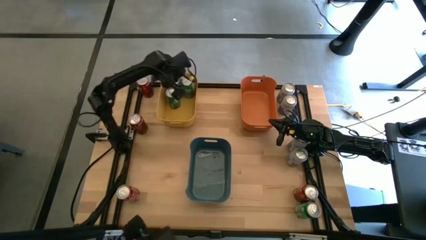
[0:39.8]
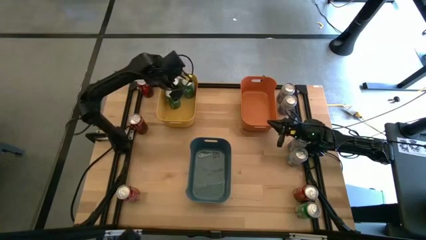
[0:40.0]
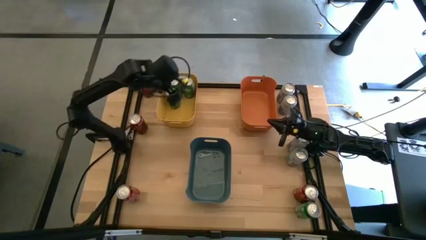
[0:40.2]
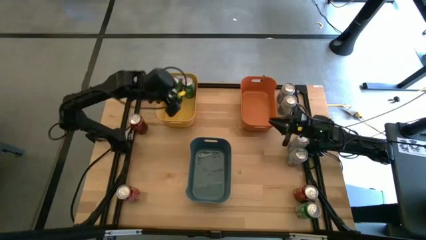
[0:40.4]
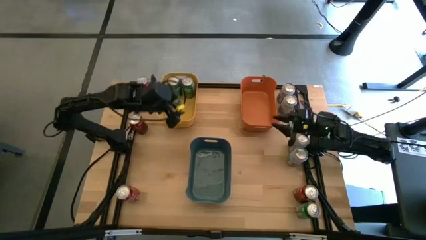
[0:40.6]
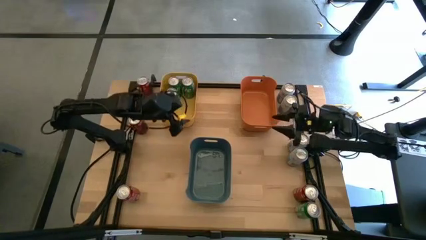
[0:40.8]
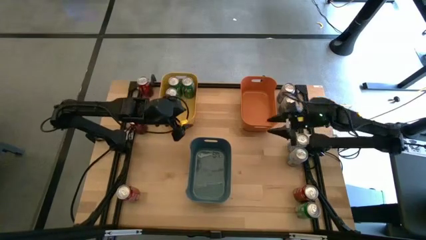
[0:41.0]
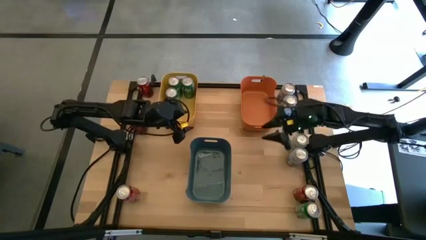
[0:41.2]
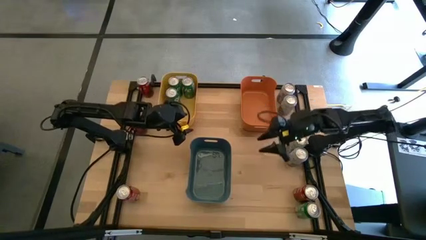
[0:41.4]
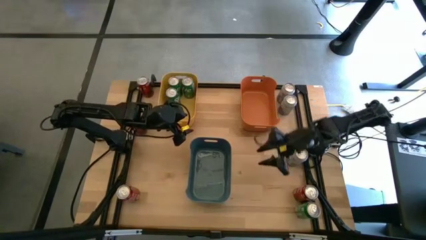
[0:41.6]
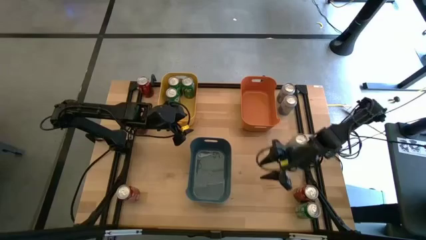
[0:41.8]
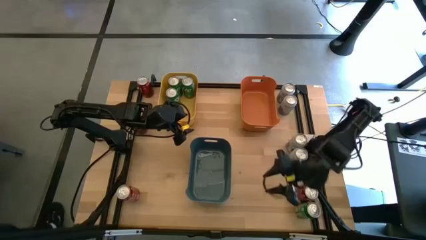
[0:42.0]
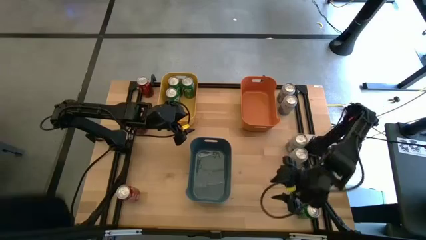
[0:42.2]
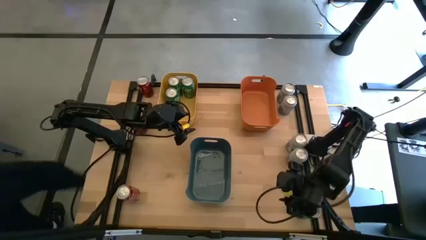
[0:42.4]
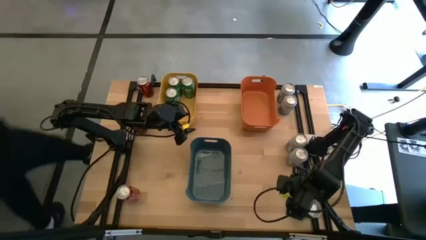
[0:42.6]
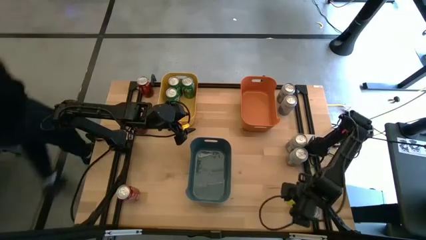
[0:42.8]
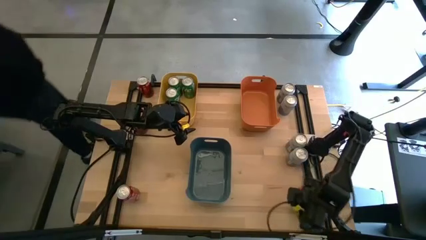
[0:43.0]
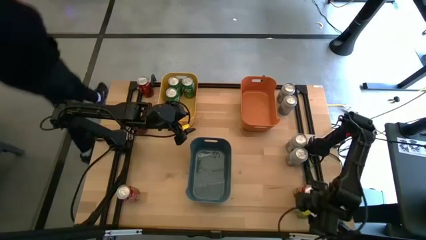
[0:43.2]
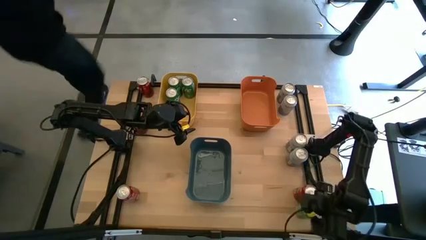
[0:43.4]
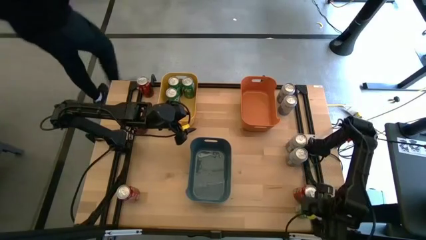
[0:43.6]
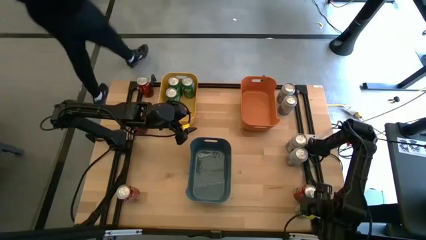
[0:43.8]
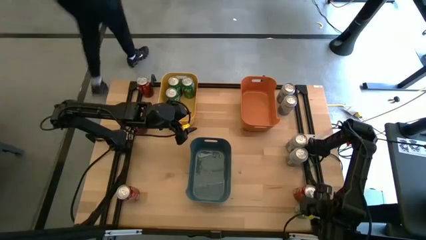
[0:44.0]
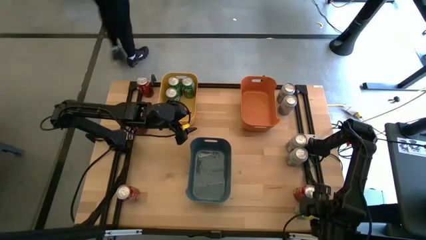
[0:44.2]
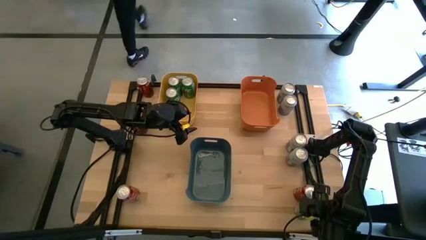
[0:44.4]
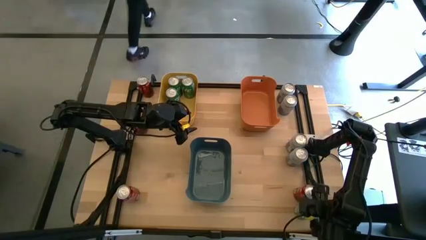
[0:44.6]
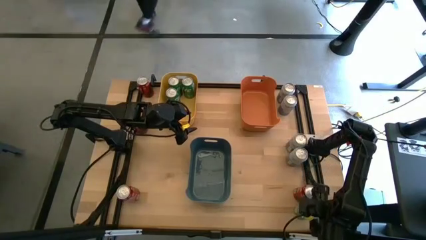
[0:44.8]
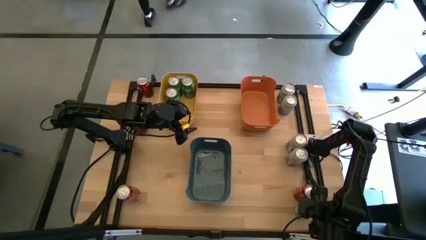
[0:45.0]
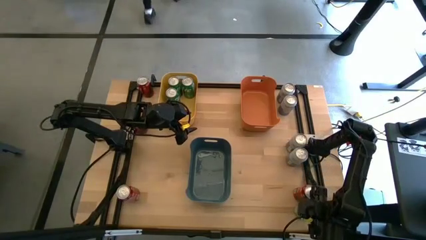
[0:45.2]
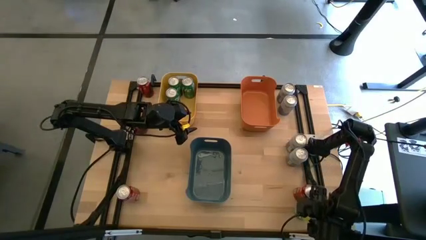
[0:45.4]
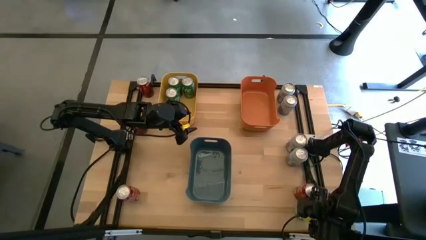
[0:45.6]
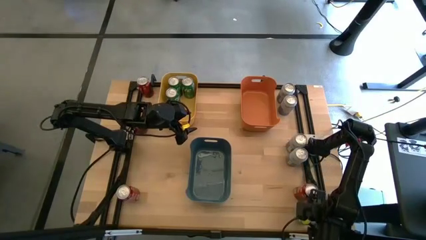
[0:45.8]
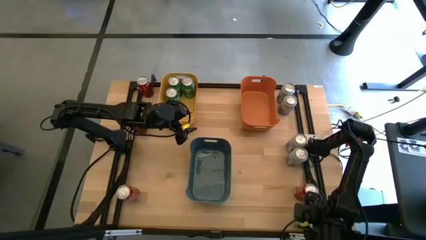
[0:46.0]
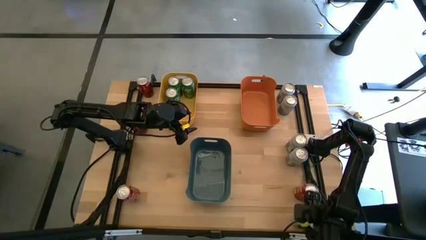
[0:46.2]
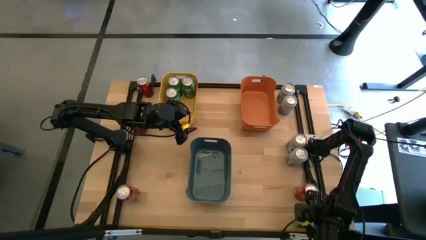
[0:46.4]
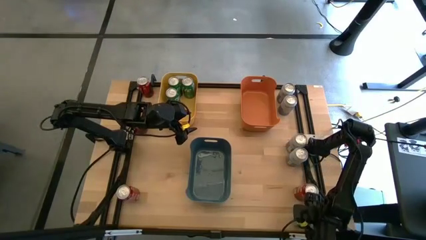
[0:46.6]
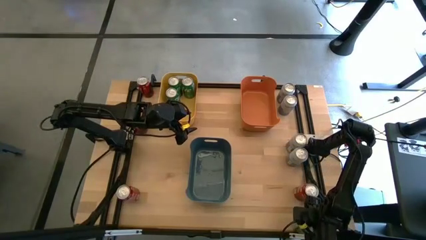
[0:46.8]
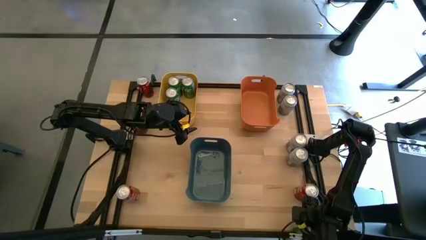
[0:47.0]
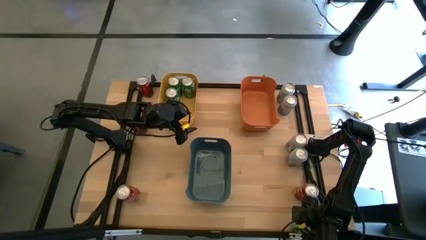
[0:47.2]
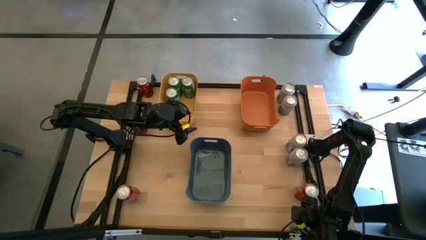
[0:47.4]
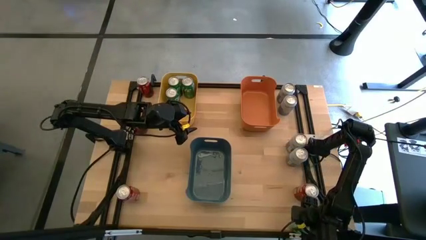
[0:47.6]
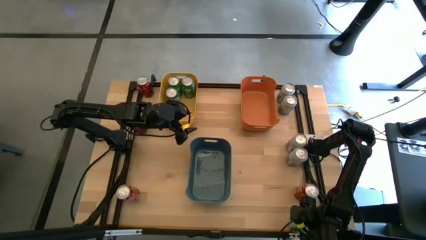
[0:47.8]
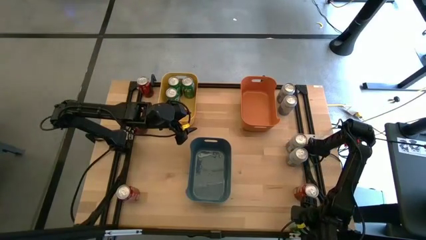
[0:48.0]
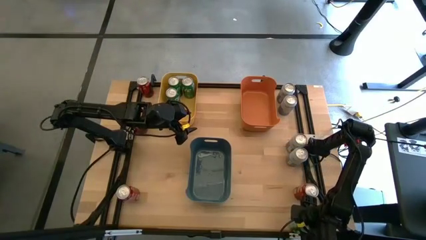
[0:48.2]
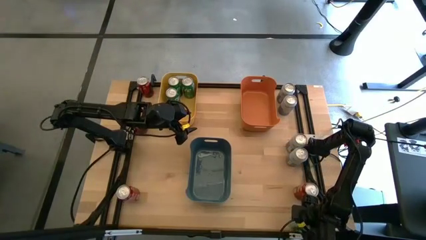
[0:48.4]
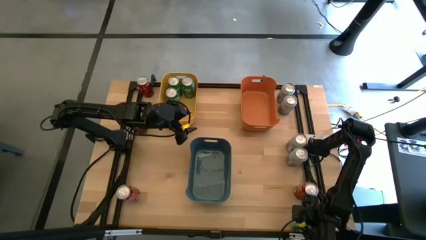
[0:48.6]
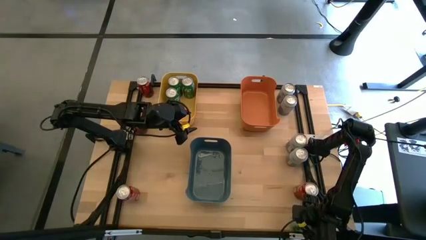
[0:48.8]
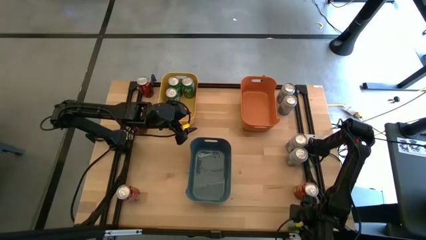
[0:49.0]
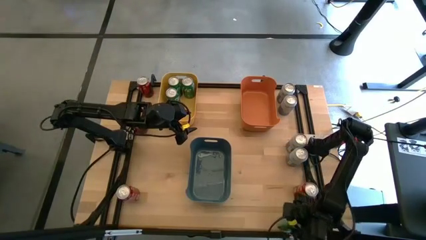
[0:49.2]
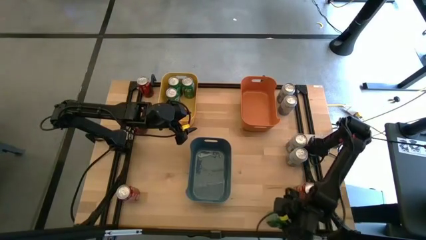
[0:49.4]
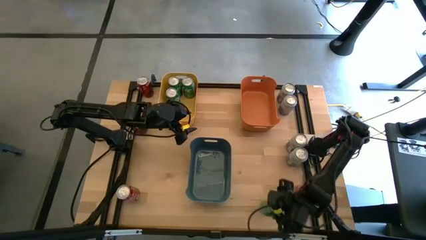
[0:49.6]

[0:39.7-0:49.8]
Task: Sort soda cans
Put the green soda can into the yellow bin

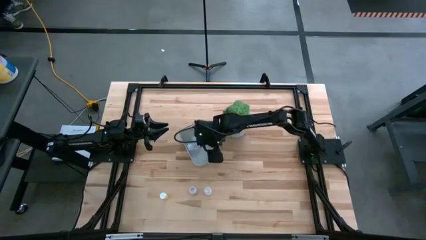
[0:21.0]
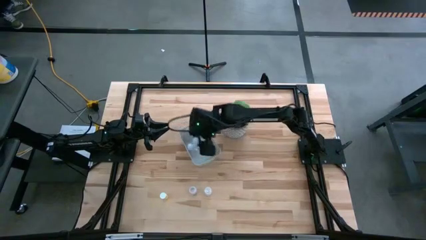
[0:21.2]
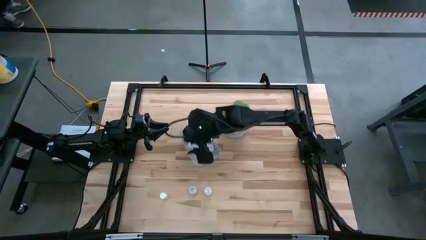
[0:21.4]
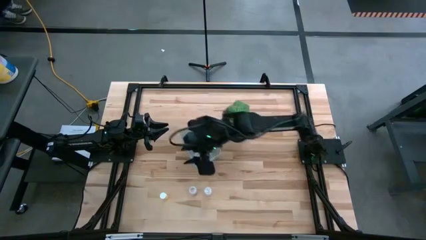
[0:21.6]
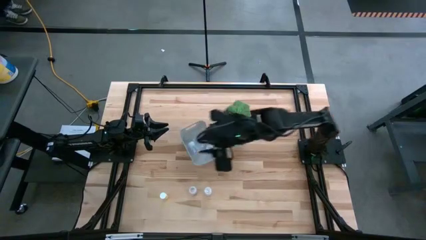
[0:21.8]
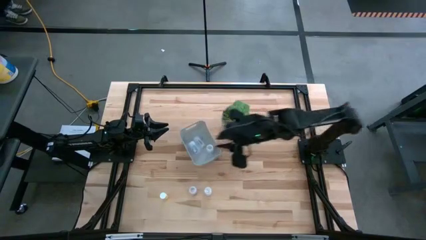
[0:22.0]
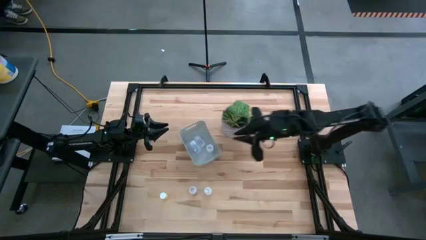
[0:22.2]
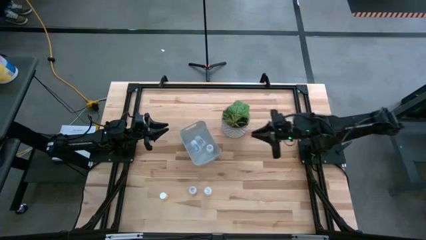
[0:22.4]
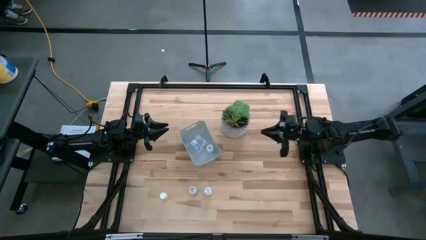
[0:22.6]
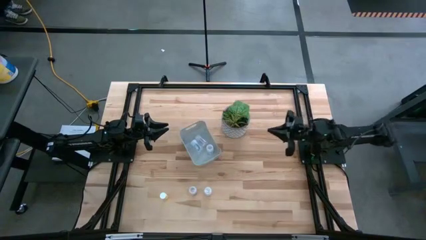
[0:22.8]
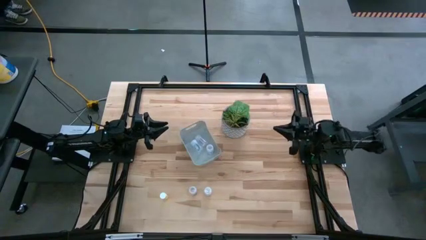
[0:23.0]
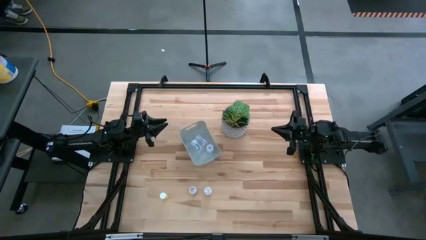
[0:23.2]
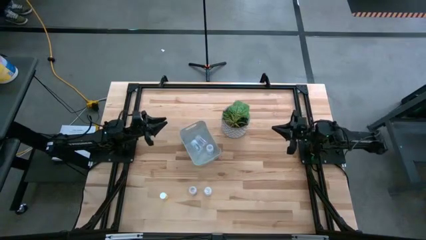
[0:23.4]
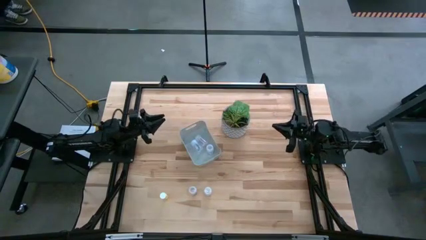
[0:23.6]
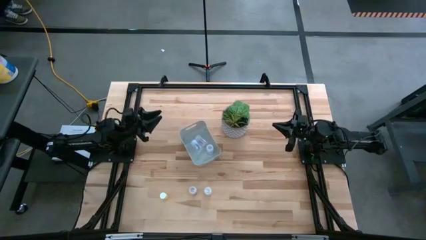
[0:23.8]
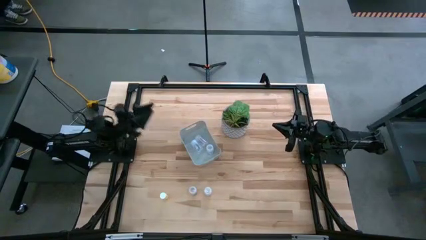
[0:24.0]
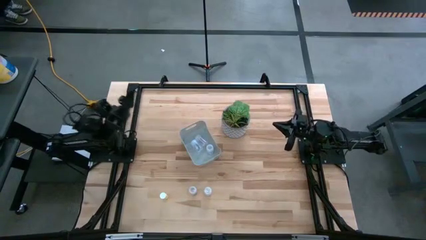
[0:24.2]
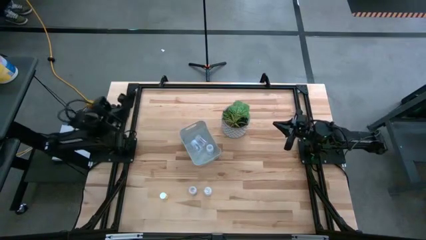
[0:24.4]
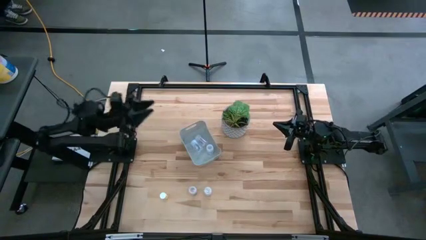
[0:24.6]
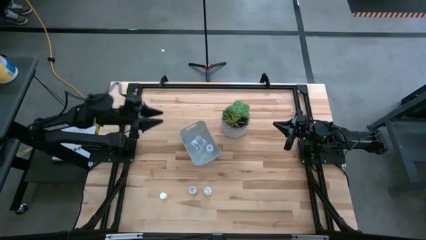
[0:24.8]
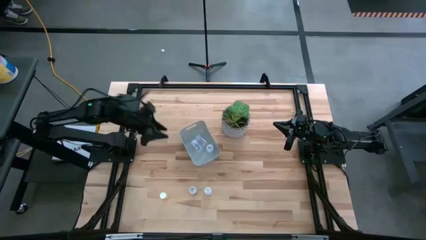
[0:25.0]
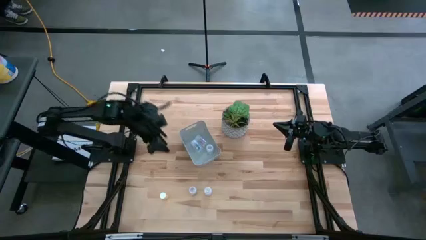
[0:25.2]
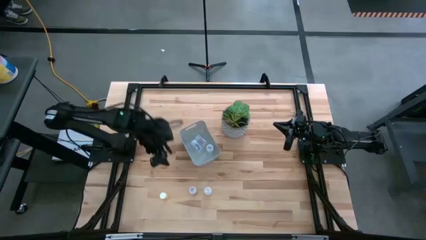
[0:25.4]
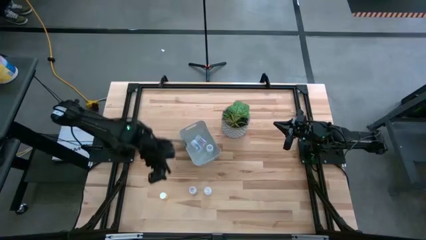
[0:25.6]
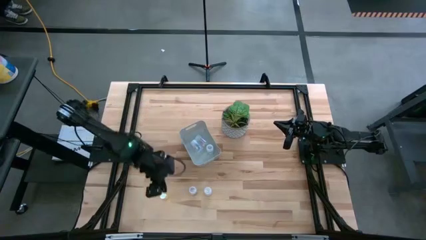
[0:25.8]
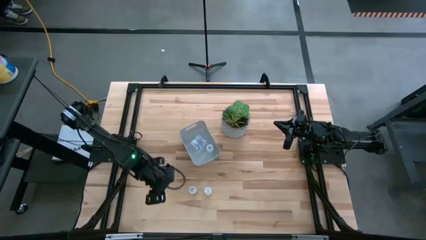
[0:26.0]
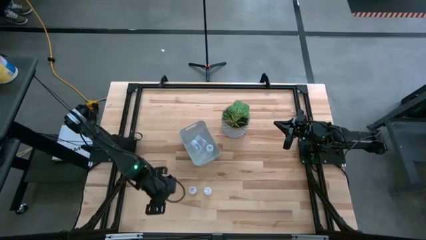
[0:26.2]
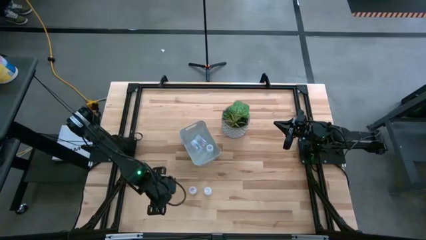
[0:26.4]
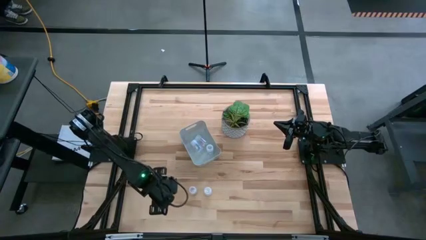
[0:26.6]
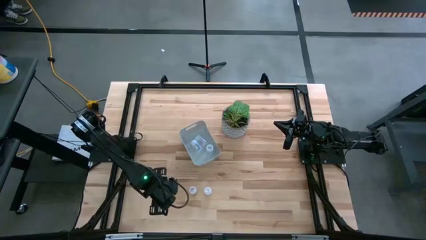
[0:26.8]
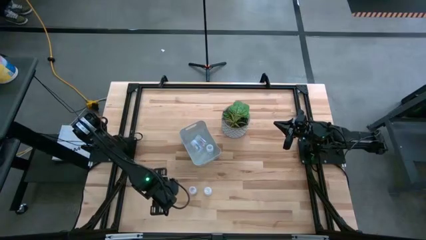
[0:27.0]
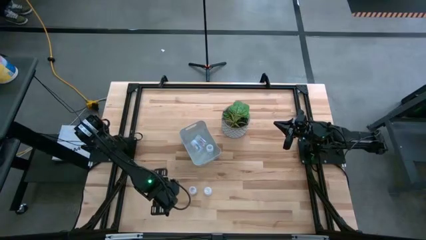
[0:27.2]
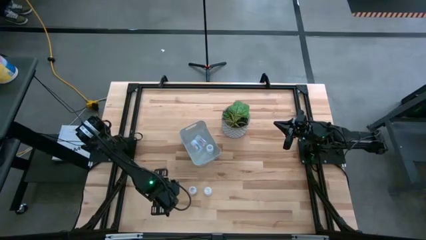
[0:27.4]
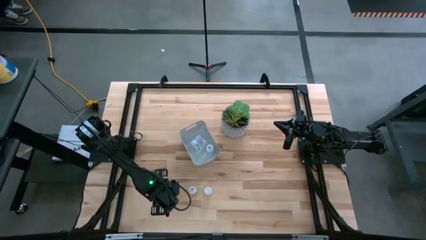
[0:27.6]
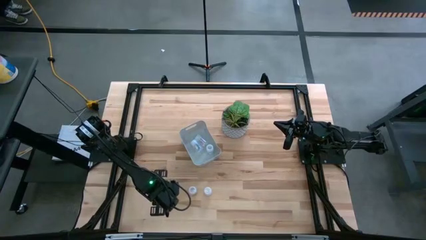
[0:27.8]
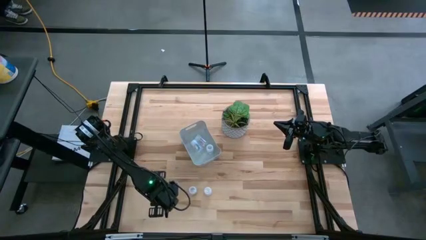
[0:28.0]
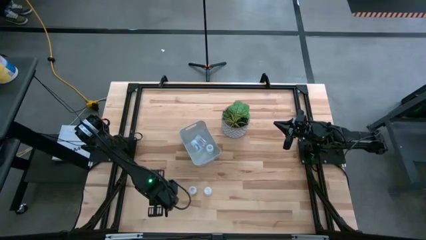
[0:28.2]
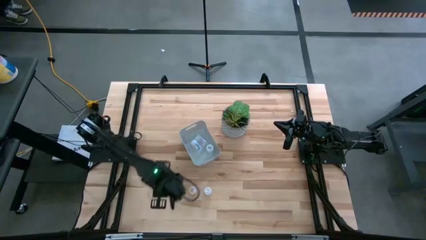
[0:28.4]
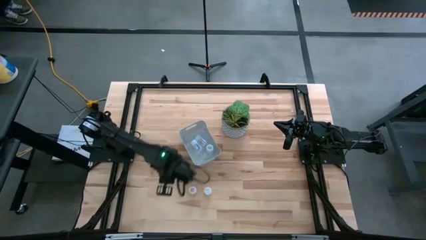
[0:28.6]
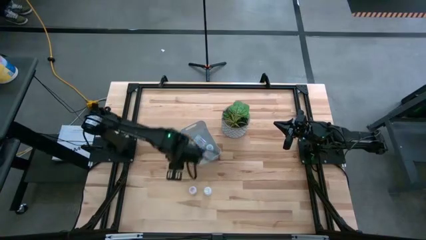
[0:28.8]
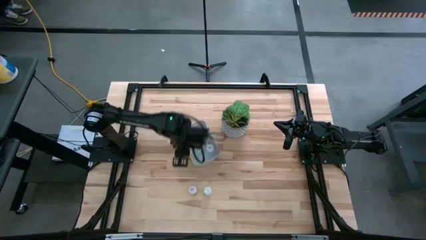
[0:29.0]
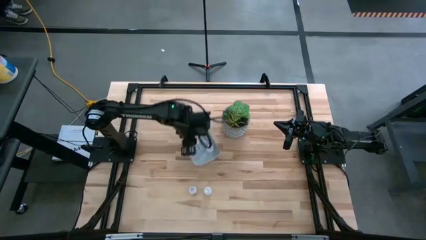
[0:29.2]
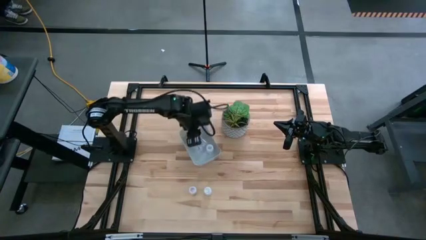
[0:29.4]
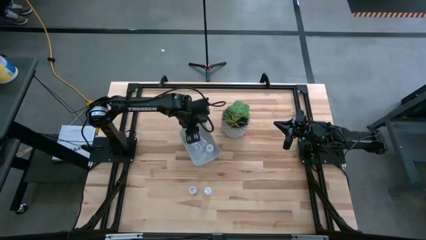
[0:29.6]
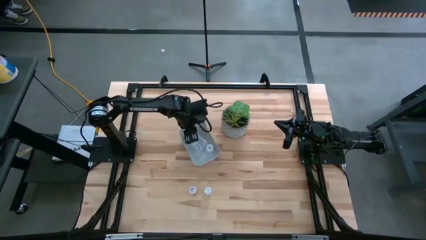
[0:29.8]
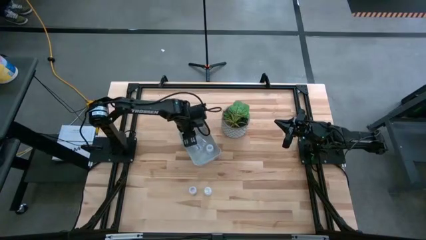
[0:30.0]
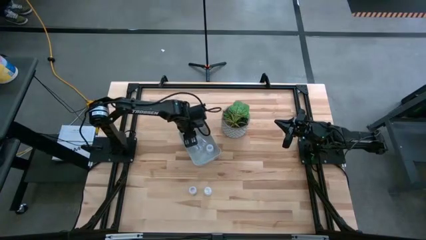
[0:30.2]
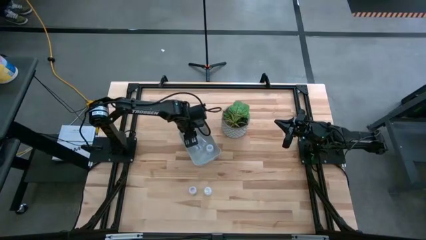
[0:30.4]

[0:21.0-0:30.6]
Task: Pick and place pill bottles into a basket
Put the yellow pill bottle into the white bin
